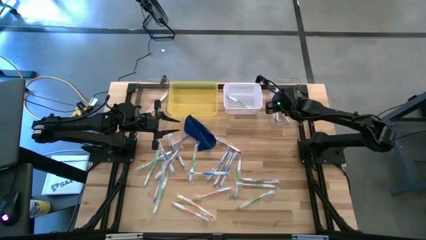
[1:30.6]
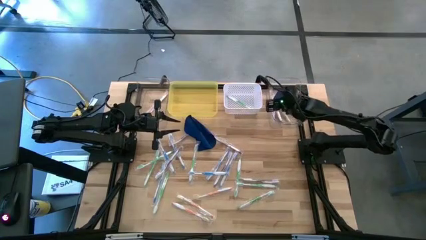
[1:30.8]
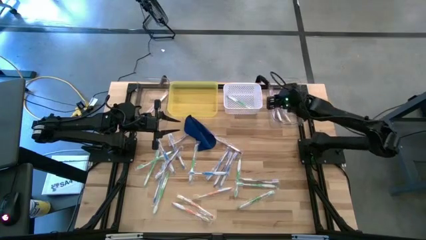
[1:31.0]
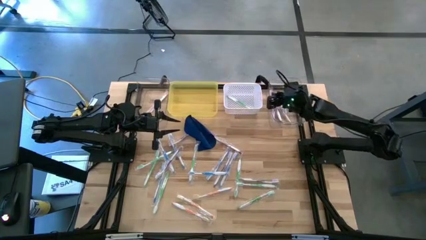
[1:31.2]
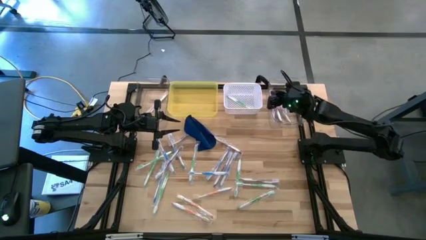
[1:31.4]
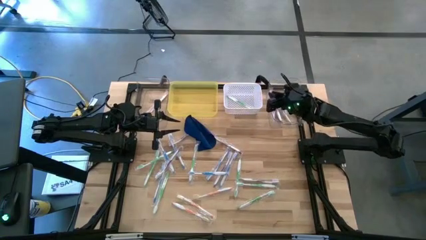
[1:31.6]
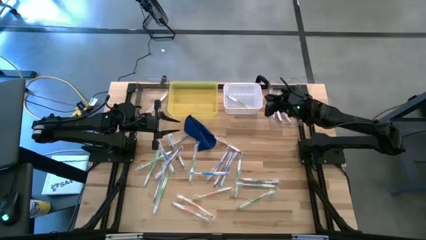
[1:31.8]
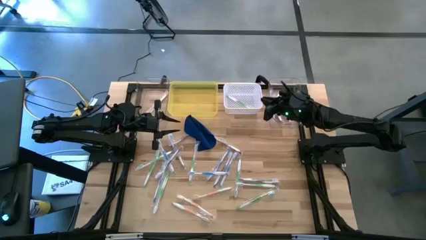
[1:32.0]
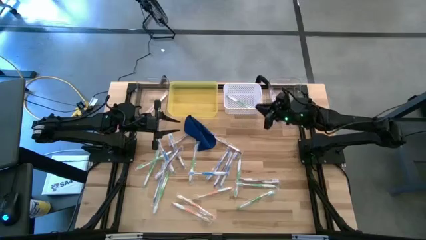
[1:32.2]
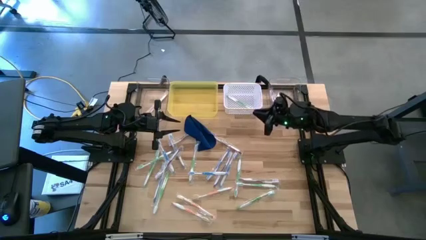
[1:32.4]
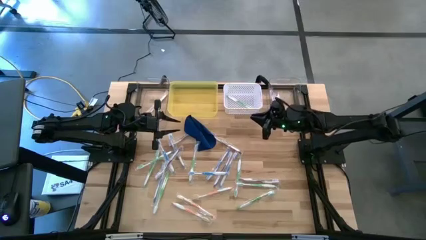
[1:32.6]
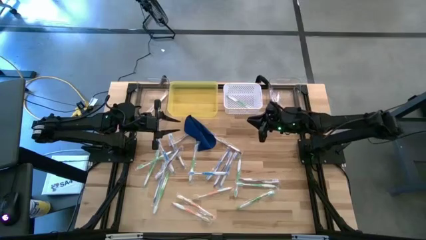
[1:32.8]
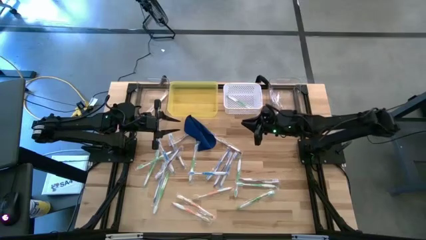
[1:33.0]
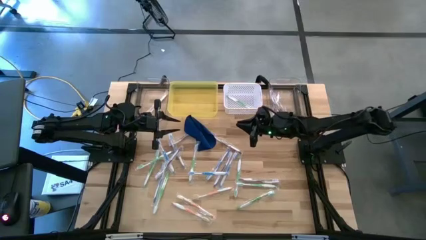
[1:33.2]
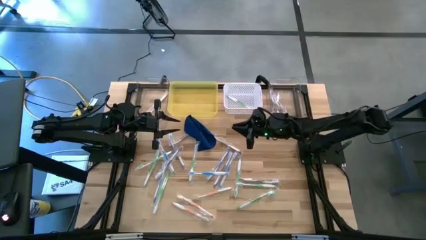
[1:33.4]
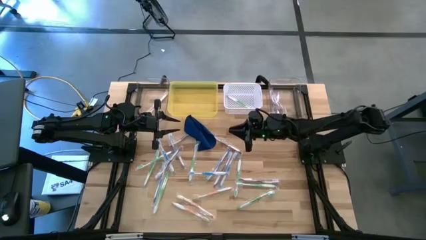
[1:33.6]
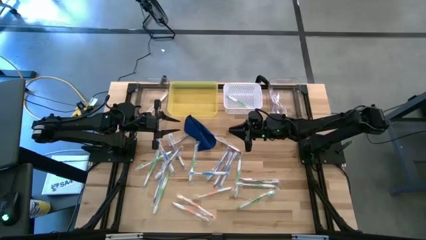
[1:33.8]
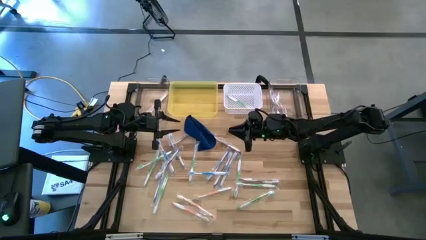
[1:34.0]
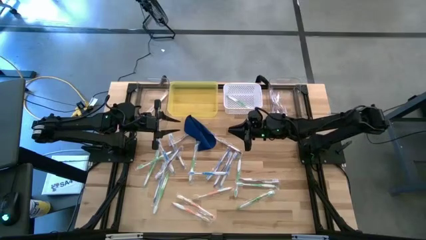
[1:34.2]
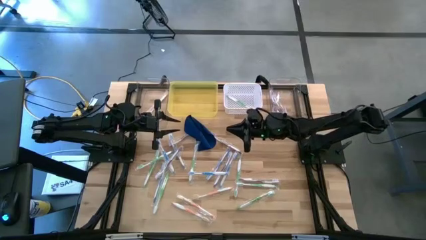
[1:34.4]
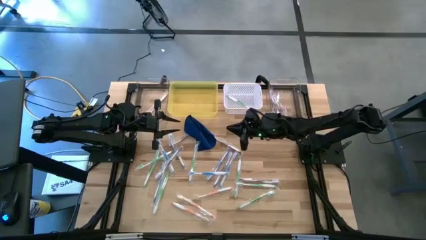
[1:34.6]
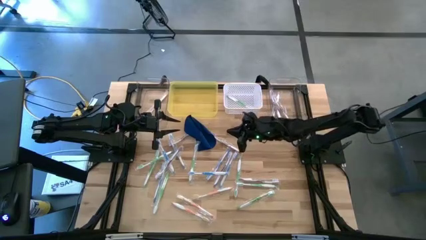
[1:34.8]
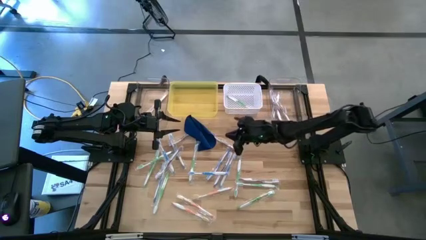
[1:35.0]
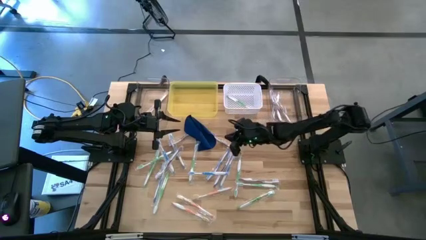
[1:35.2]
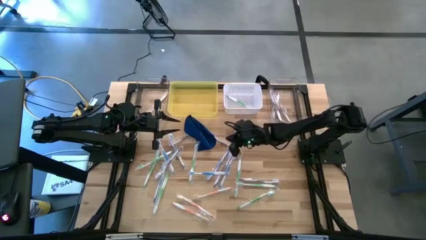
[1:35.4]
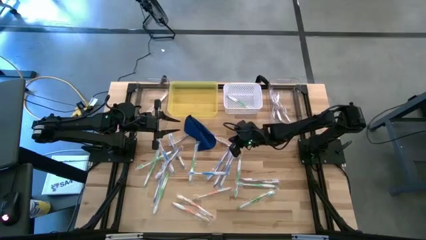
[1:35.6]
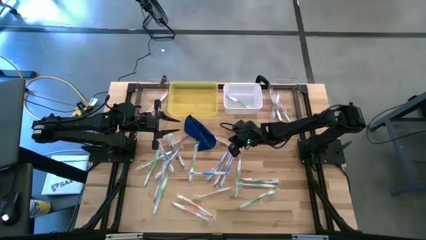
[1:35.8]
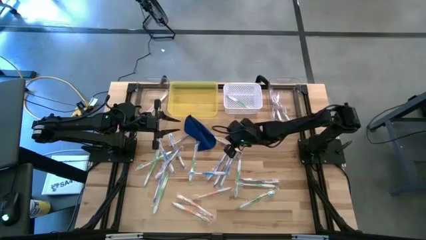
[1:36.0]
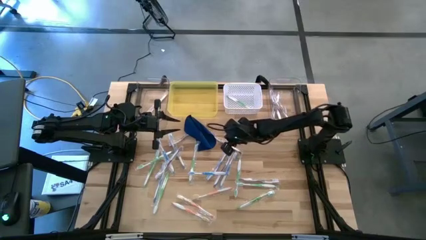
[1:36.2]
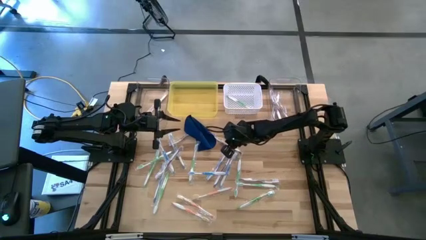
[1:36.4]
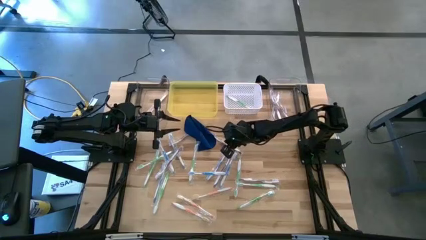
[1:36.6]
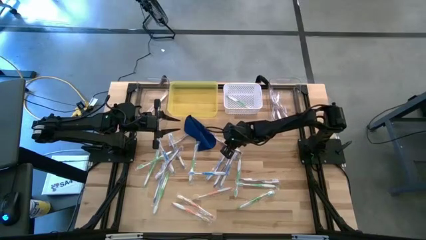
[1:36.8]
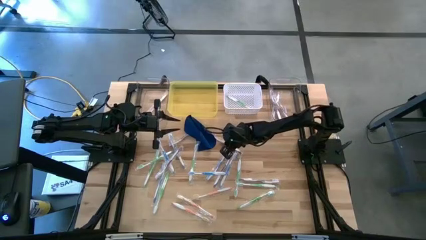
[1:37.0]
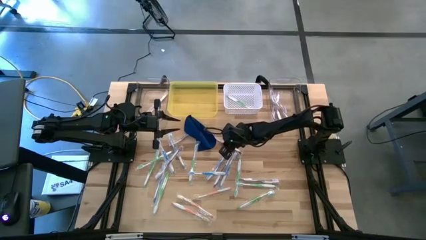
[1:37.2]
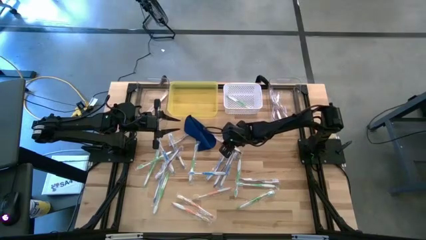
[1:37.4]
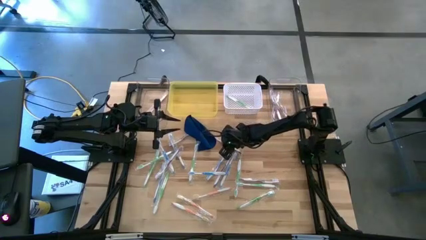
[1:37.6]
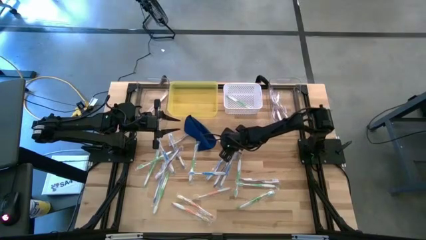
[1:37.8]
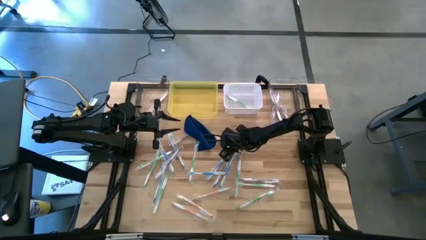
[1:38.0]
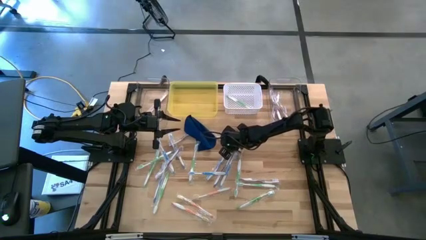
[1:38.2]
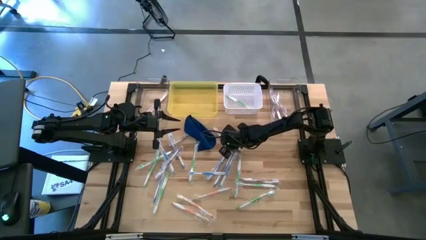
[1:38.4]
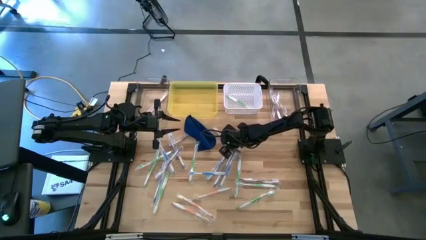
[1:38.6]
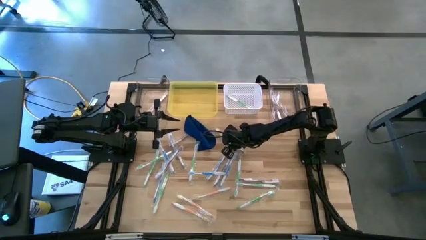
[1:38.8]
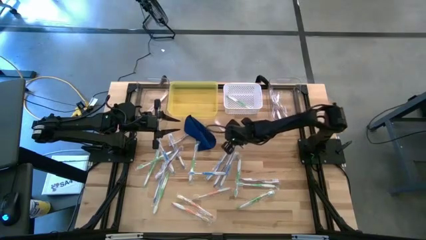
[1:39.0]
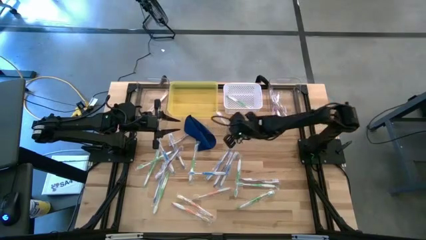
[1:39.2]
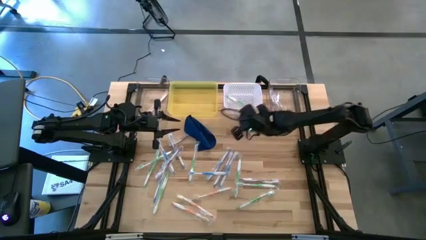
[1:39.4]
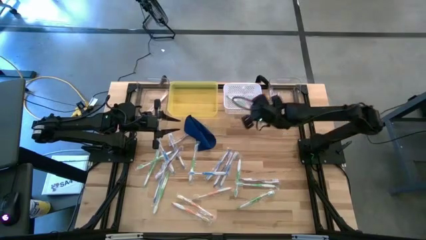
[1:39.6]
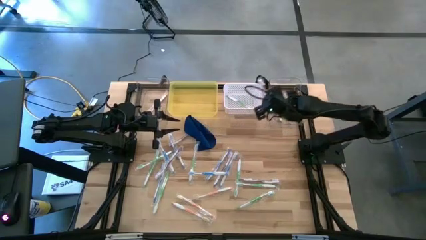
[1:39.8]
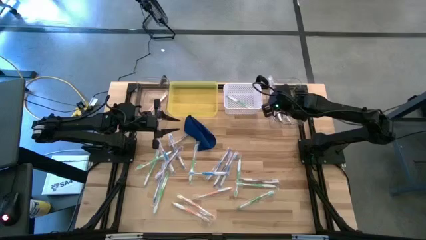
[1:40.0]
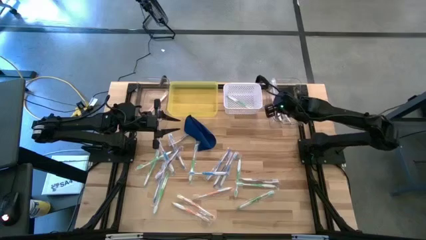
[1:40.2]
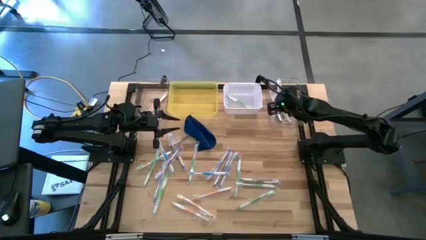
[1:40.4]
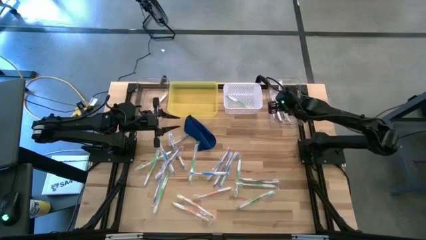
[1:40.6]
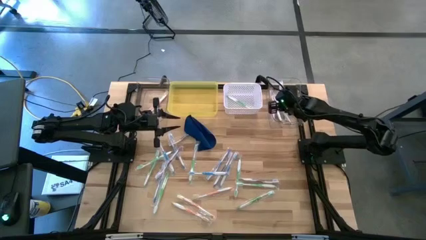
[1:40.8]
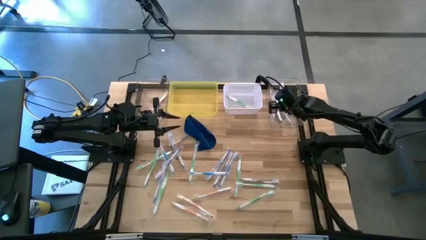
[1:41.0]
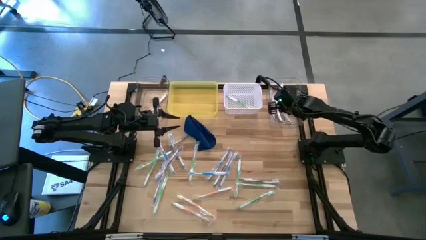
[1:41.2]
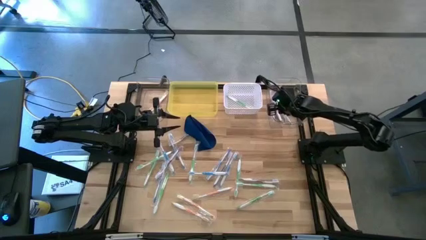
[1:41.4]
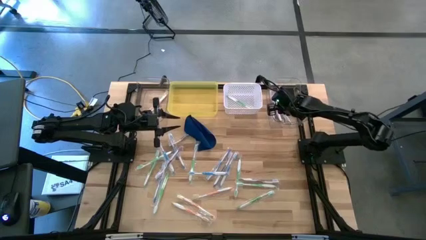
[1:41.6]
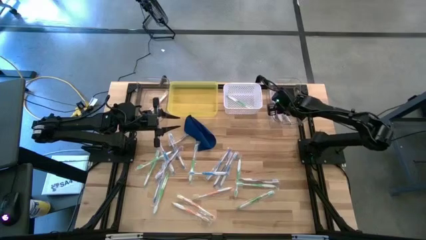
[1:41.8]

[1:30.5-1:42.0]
Task: Pick & Place Toothbrushes
Put the violet toothbrush into the right transparent bin

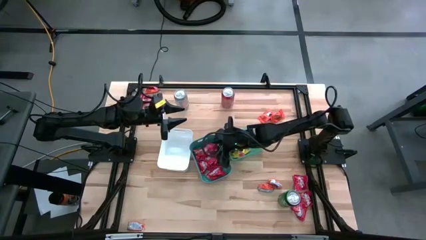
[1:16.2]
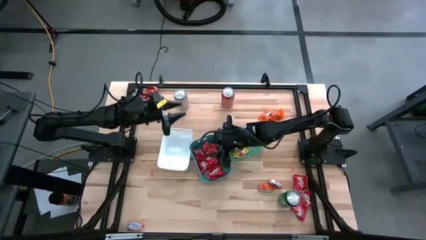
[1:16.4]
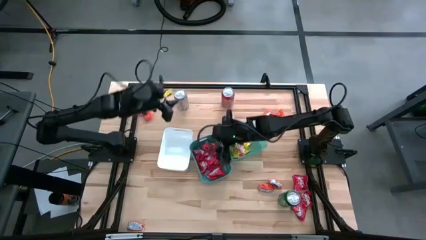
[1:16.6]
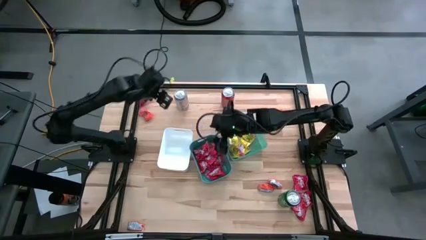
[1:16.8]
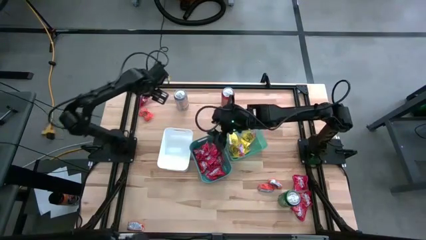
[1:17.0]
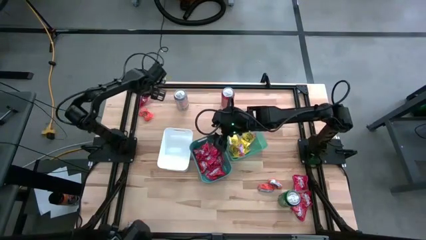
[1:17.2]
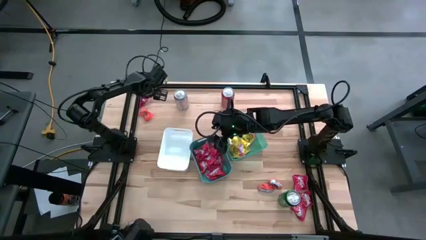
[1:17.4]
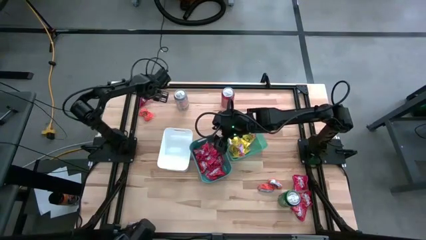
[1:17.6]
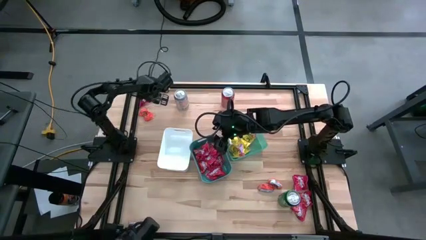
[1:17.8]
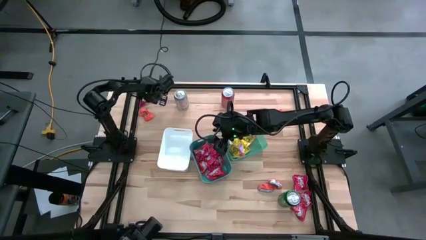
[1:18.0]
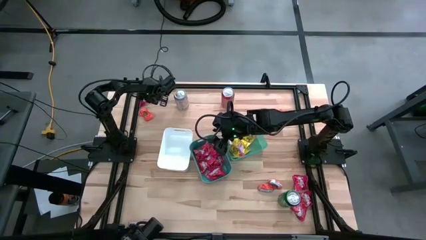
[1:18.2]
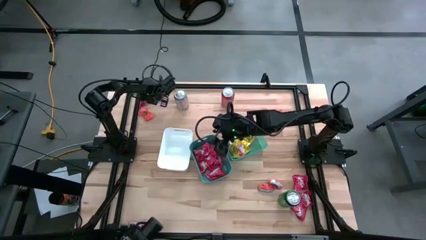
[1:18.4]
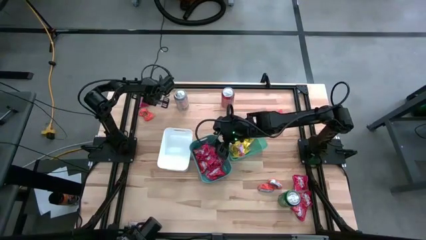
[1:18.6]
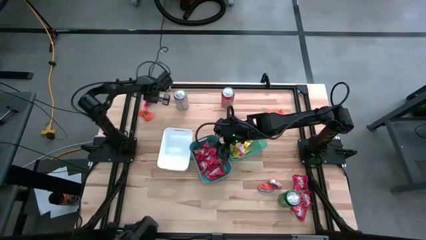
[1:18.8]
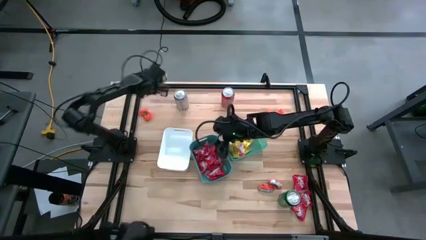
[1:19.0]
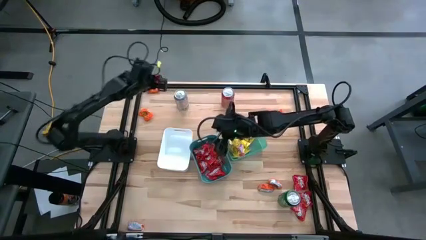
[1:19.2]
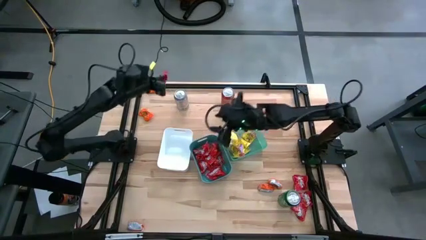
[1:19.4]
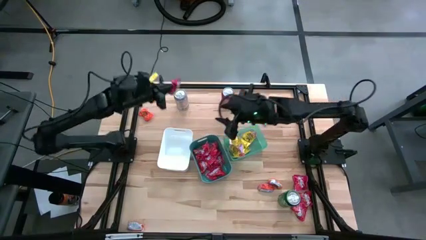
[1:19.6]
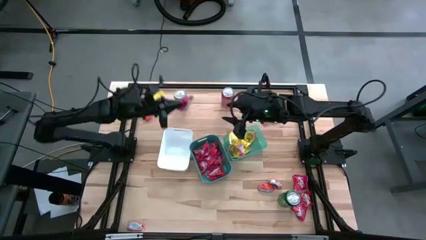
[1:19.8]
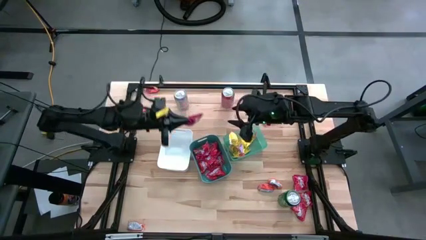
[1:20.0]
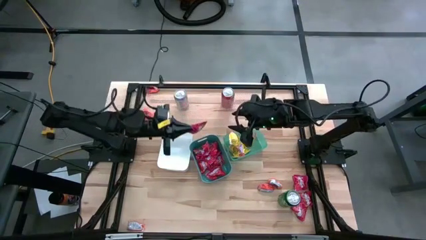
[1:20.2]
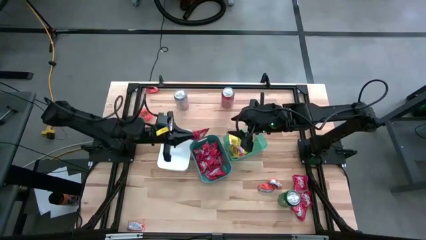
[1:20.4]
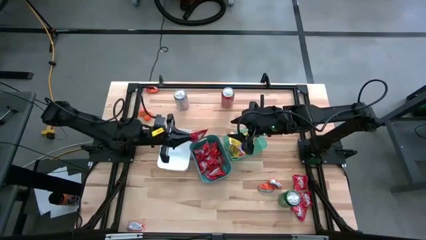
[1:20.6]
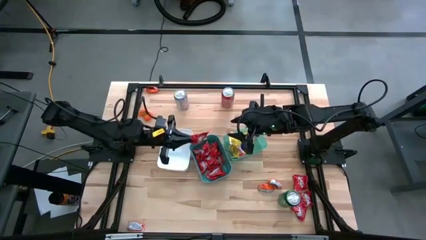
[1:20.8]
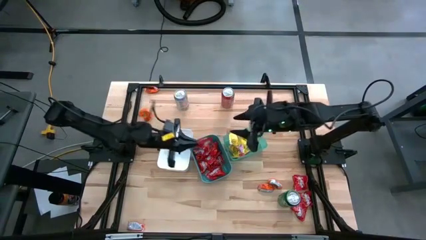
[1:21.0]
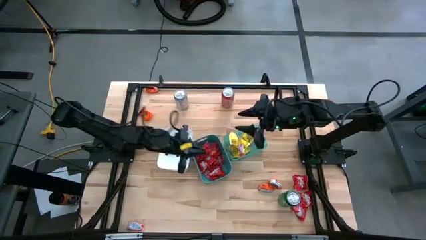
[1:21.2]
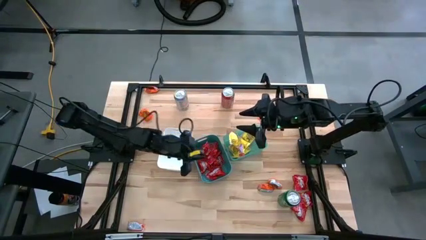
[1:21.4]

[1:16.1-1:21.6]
Task: Sort candy
Put the red candy into the green bin
